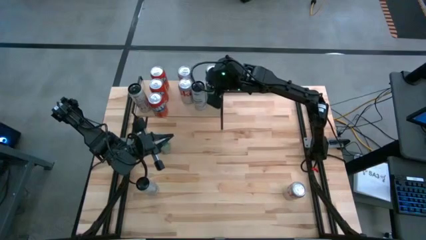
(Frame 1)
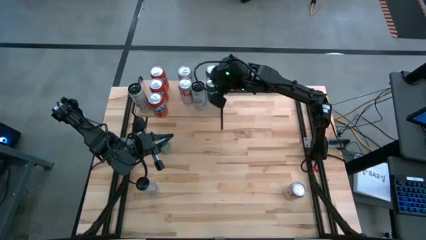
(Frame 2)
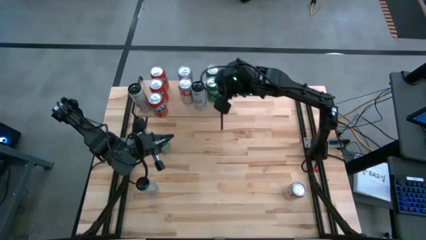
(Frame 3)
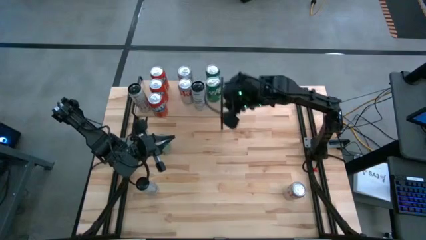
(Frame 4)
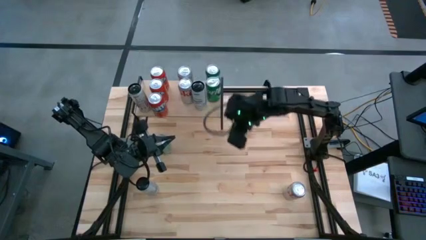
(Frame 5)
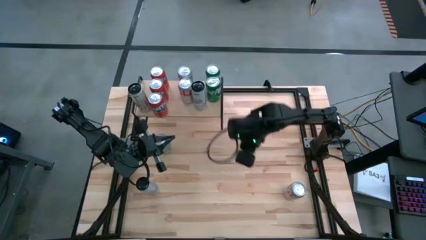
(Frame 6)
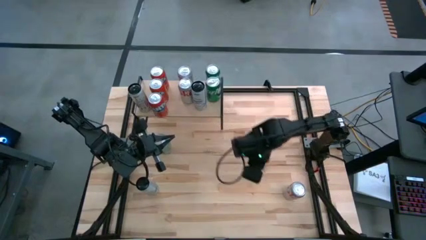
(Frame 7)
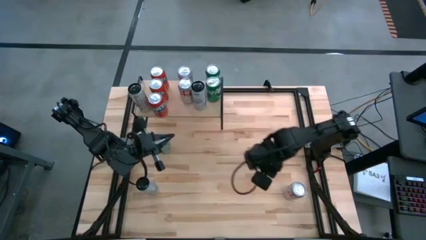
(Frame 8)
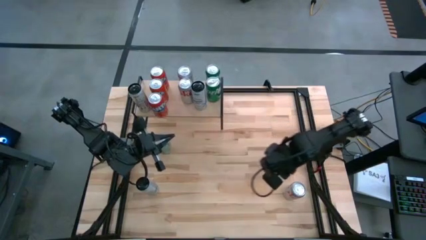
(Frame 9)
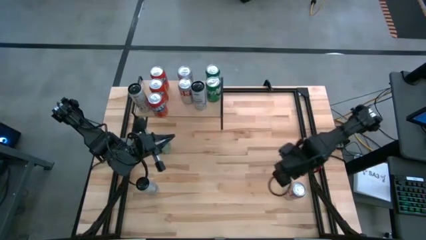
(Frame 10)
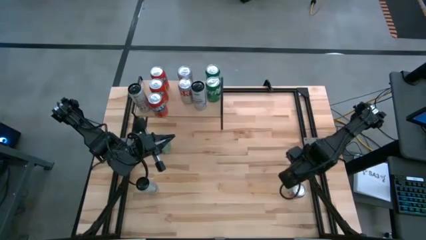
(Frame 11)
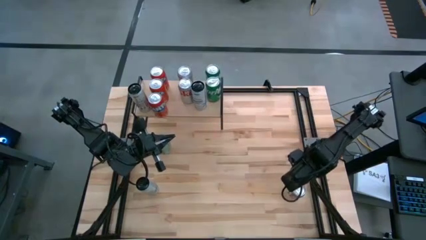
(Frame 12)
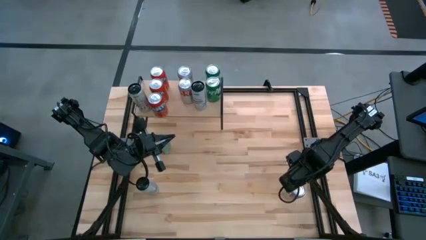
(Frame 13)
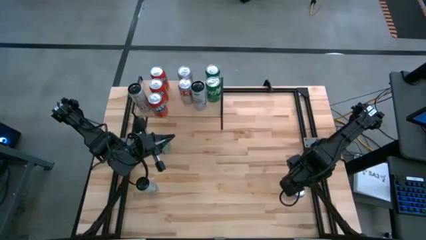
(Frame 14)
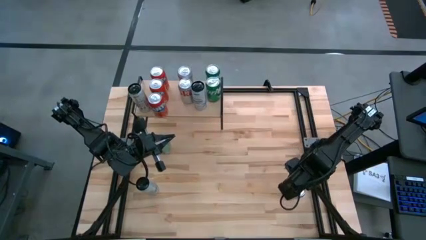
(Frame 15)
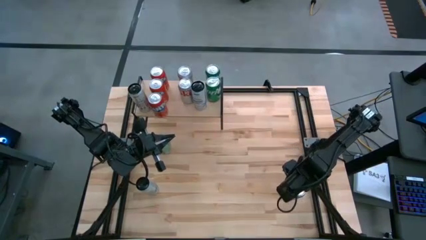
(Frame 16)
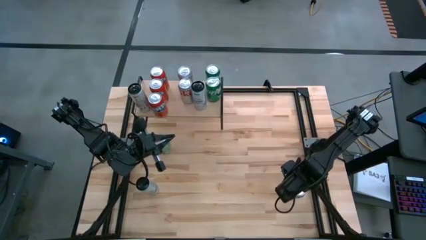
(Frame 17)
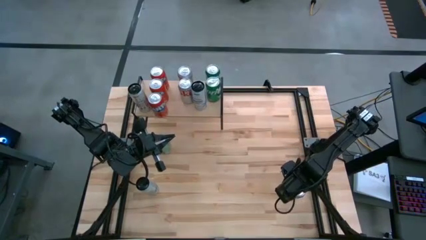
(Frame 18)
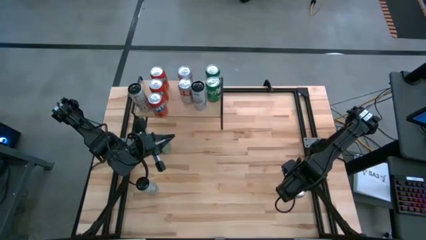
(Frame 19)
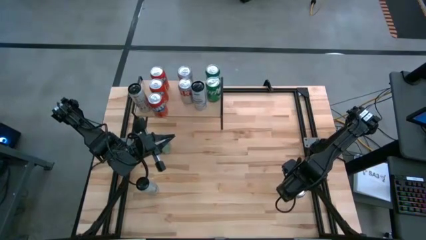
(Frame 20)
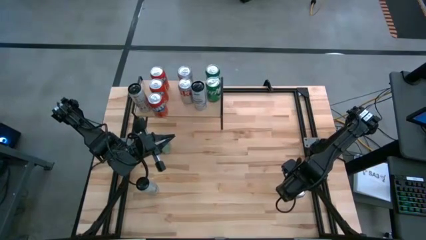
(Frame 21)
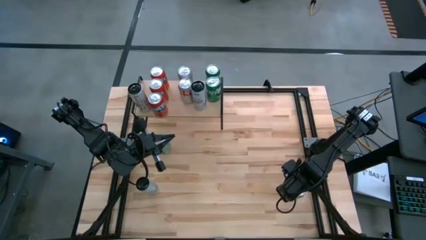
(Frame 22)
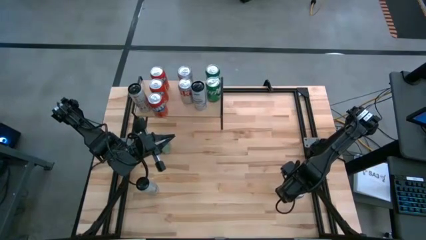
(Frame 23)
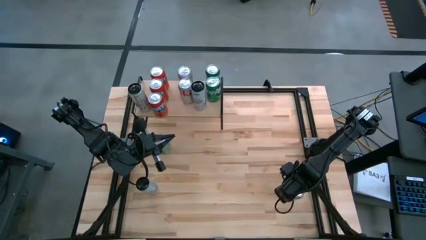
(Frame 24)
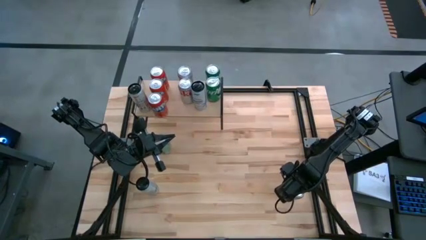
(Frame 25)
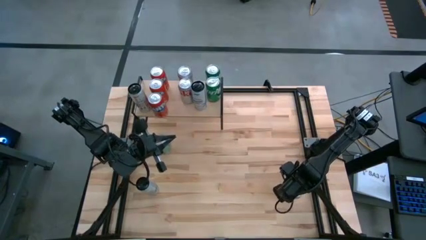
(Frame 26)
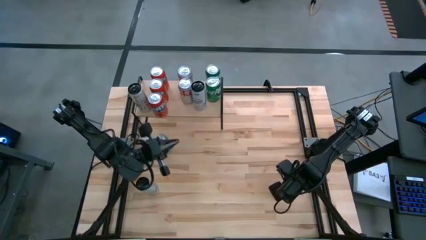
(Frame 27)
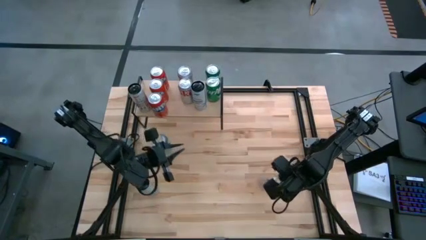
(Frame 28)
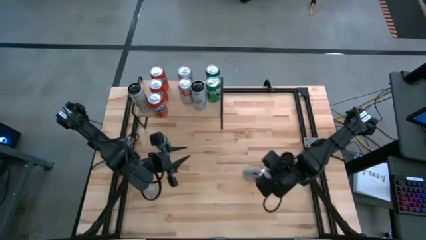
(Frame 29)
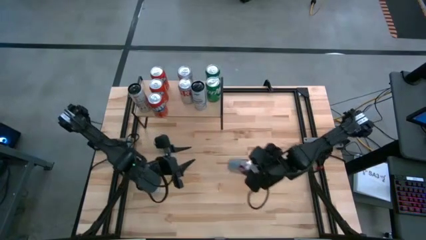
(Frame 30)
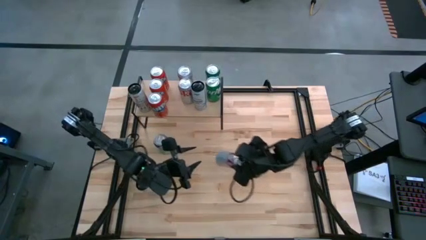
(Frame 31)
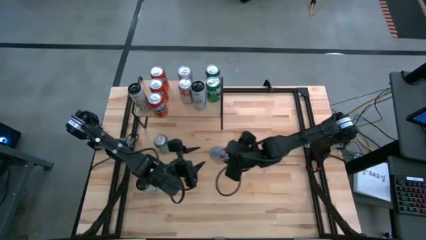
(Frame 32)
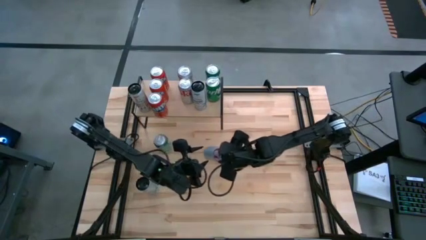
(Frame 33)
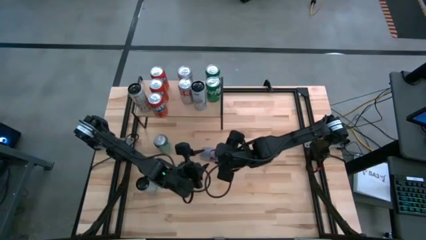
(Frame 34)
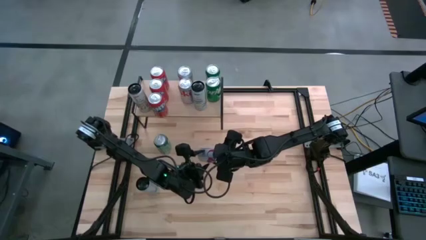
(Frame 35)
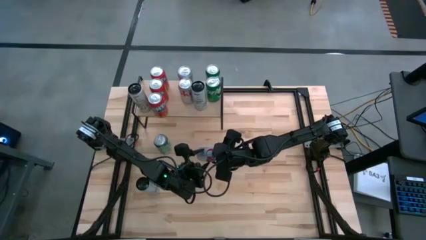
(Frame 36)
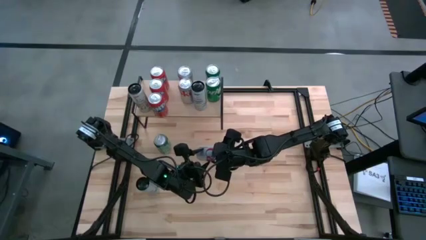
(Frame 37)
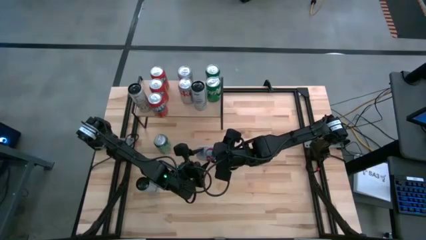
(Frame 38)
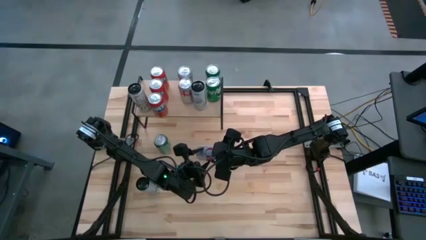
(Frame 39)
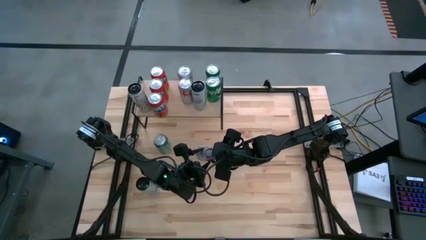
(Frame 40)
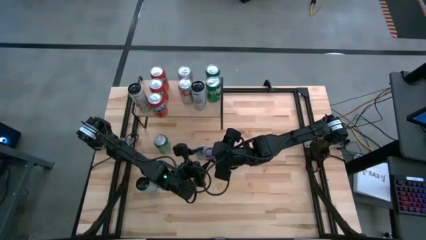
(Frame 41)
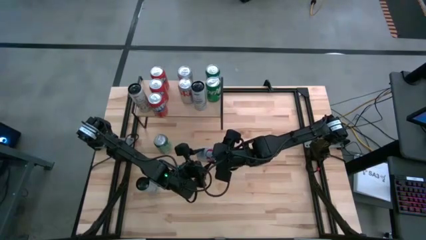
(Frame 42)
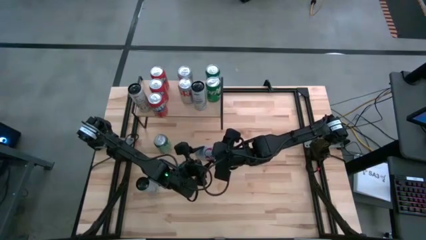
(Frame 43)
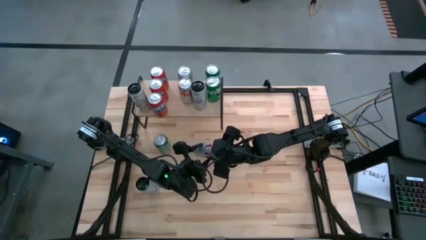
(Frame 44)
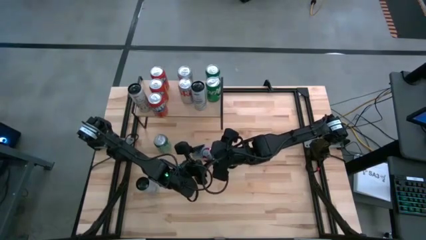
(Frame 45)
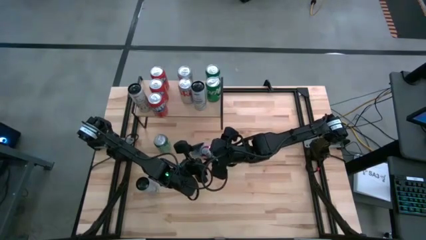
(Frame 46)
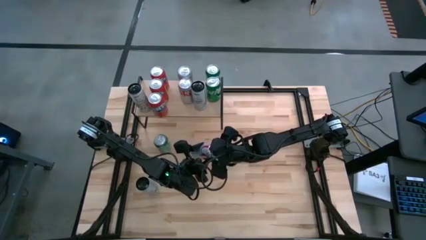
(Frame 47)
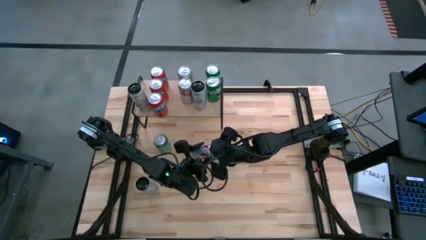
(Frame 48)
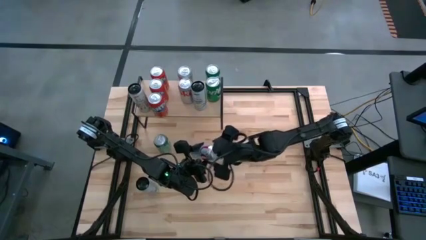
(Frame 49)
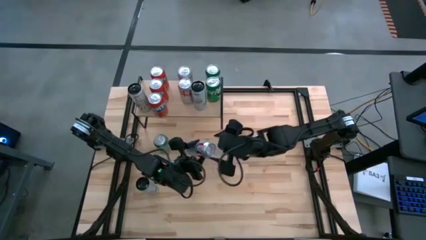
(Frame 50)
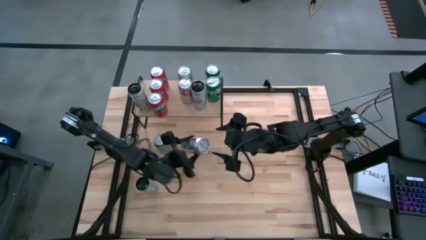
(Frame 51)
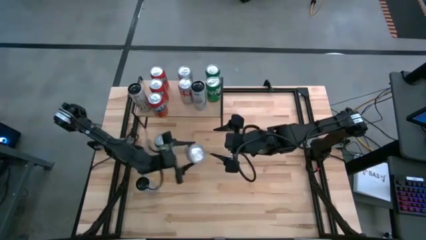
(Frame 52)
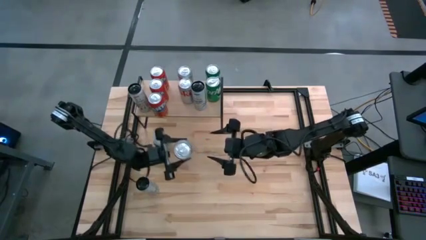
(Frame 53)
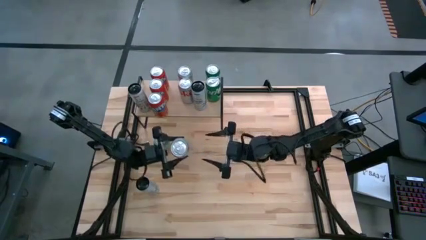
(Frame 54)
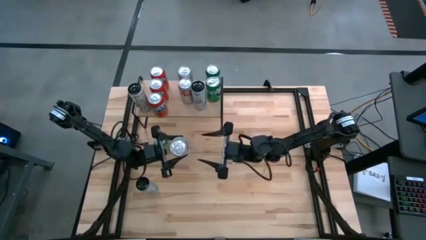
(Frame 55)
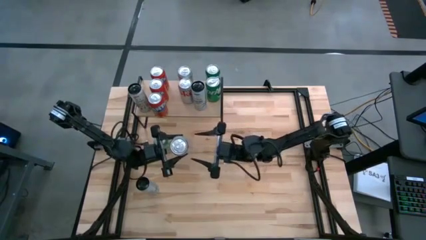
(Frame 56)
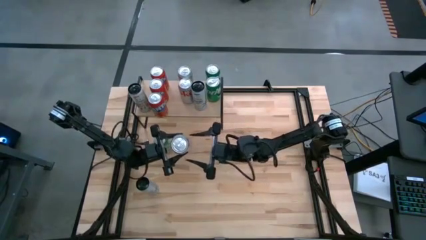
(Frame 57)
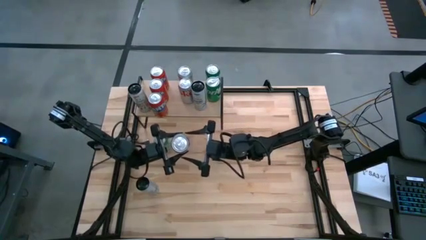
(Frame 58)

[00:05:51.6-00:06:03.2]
Task: Place canned beverage on shelf
Put the silver soda can aligned with the other silver soda cans on the shelf
